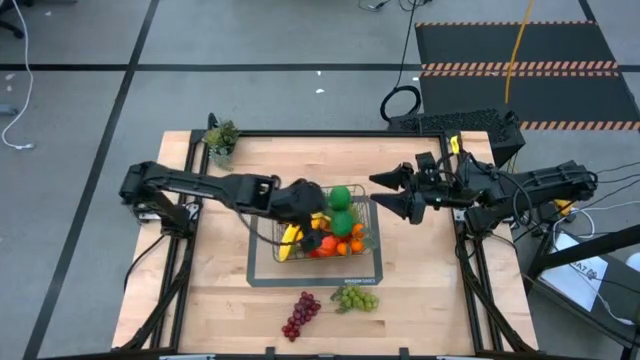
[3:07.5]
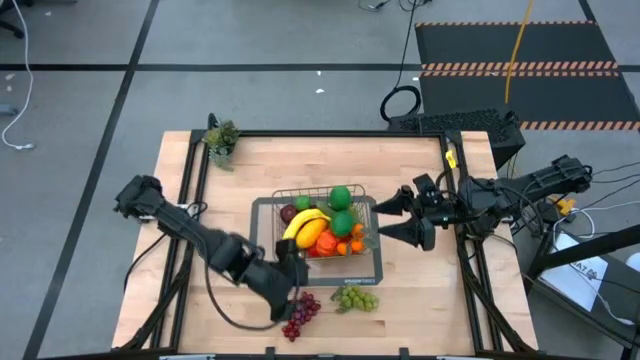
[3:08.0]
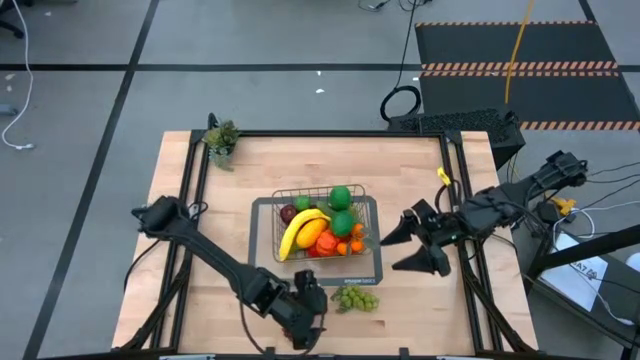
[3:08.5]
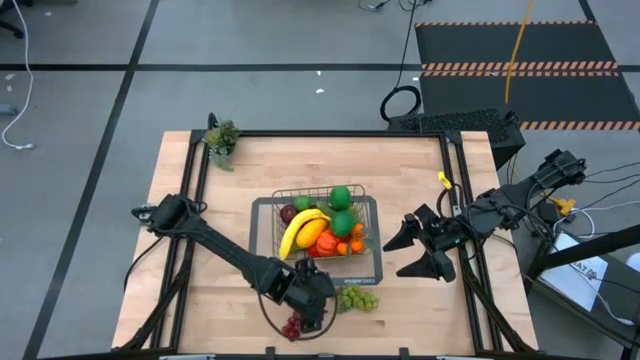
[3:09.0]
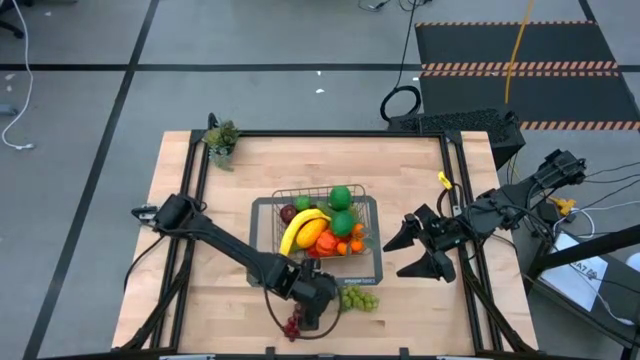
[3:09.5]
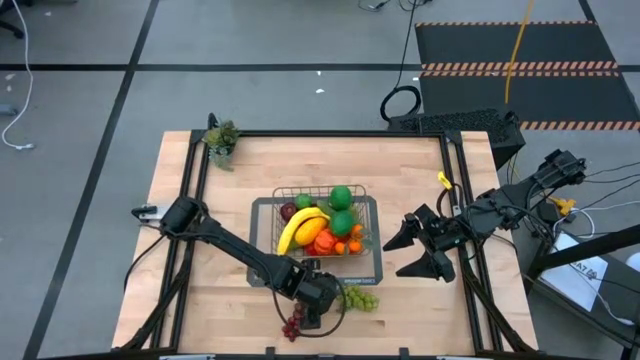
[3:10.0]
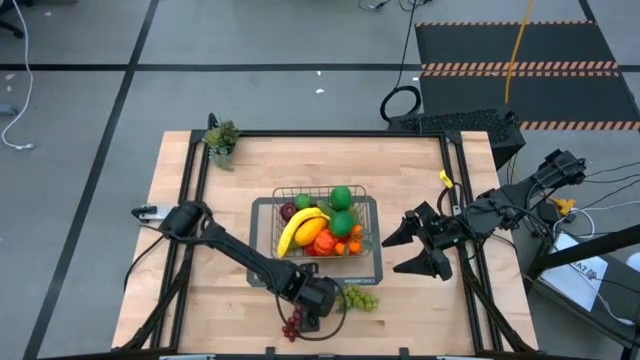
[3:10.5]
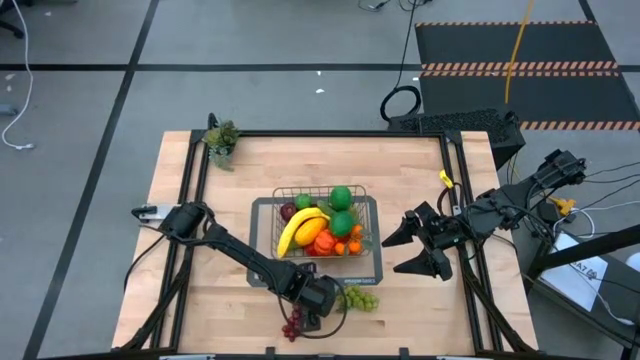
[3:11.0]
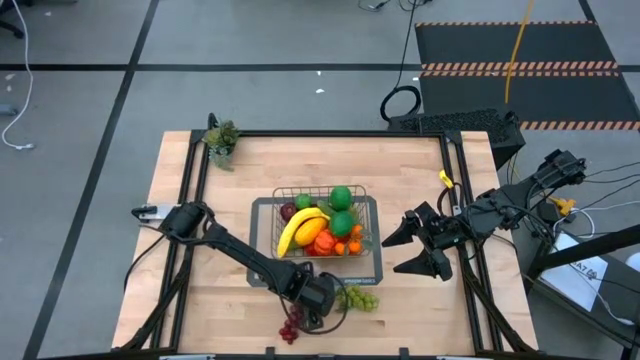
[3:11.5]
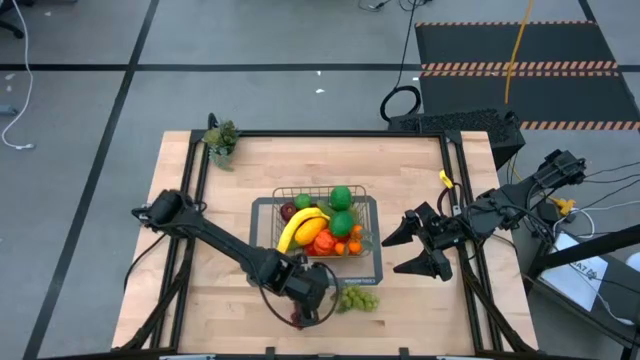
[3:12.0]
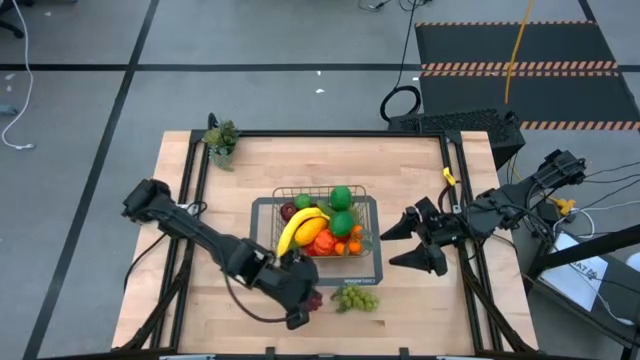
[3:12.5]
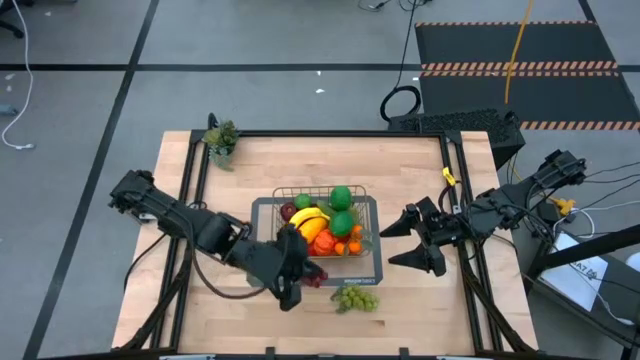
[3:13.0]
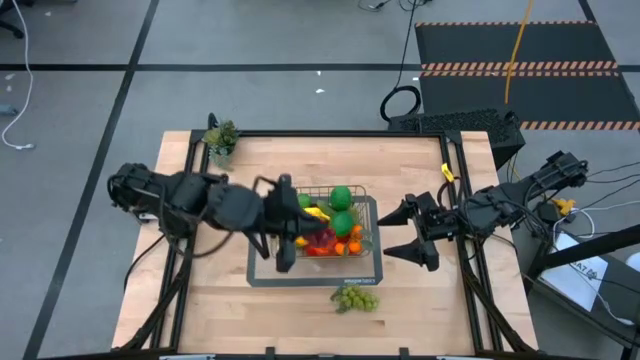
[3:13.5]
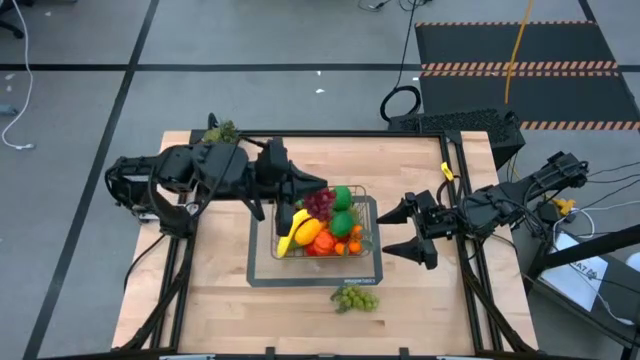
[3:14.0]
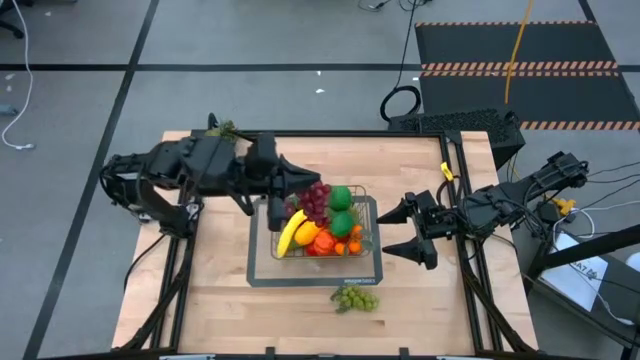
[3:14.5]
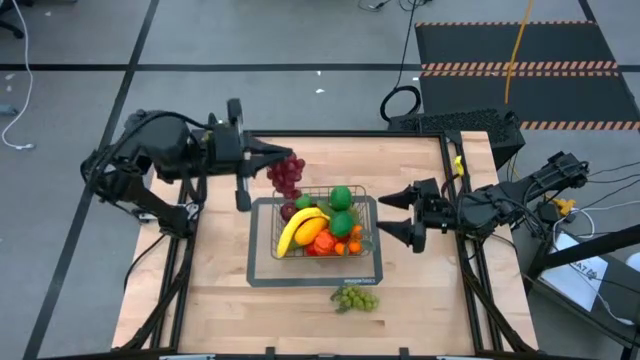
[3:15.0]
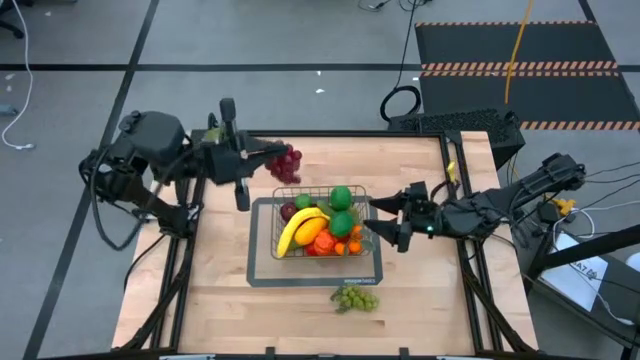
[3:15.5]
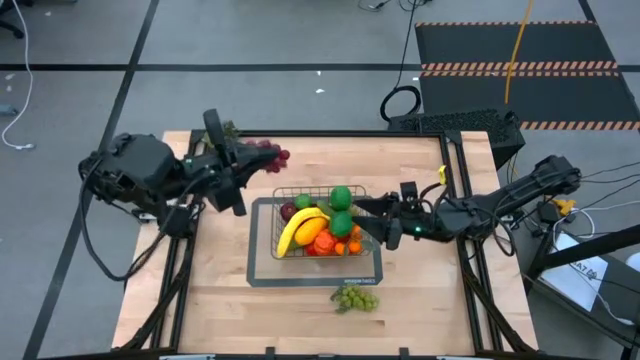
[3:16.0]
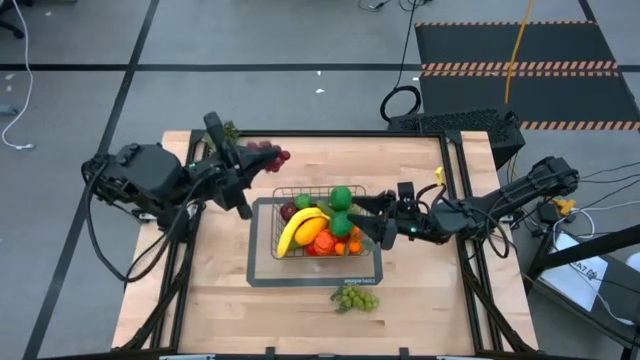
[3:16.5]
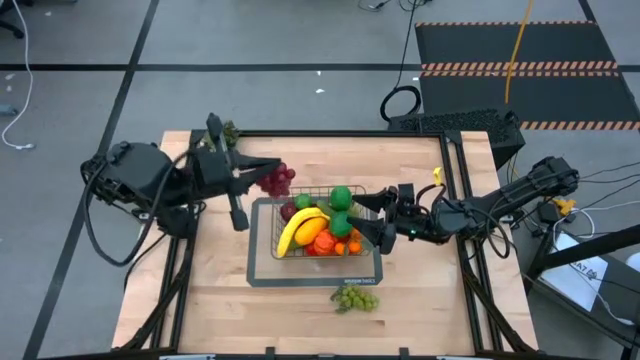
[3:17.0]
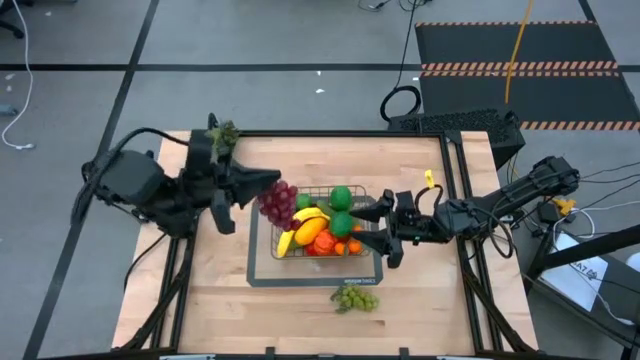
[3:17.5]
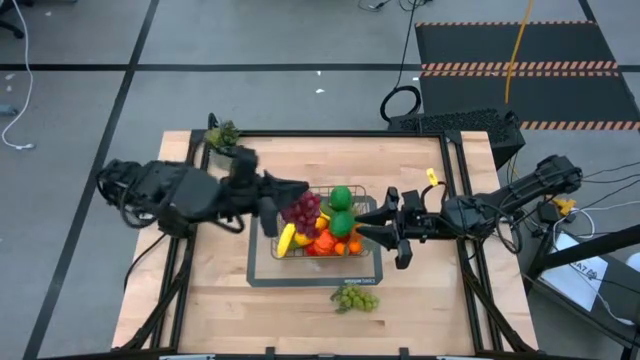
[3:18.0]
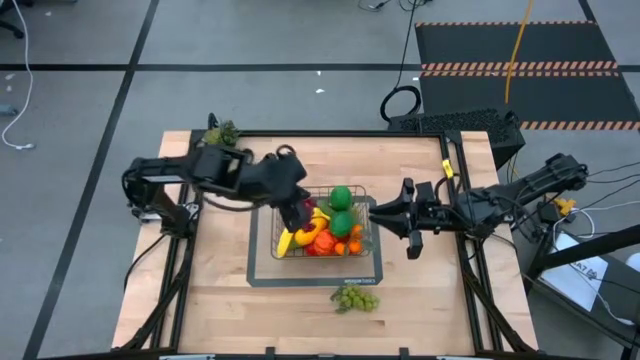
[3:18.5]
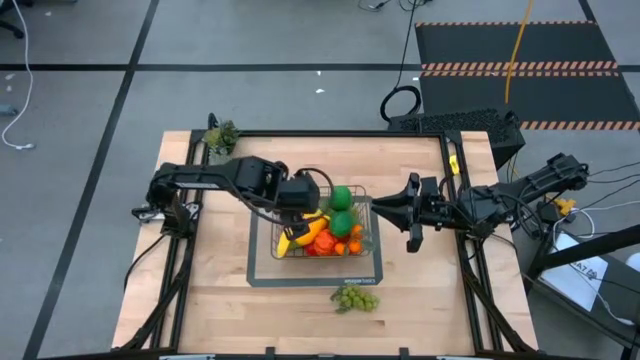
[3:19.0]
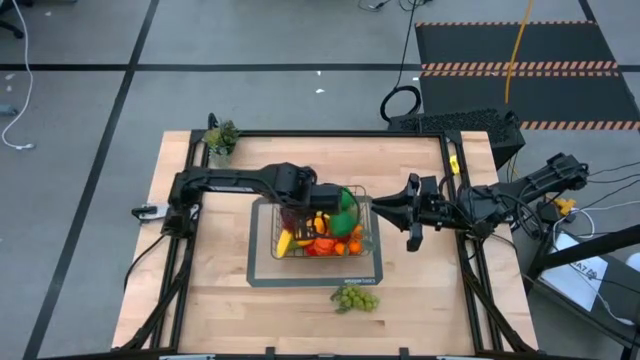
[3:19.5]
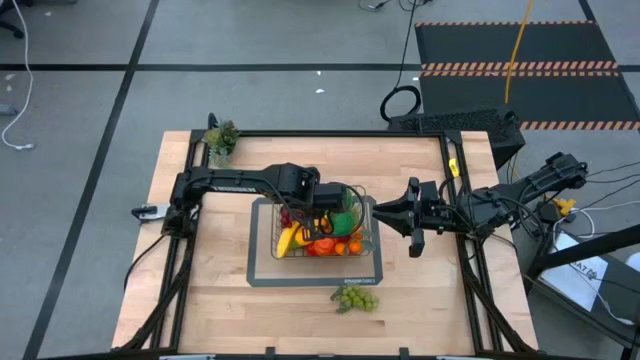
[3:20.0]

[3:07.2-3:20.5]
Task: Build produce basket
Put the violet grapes into the gold wire basket

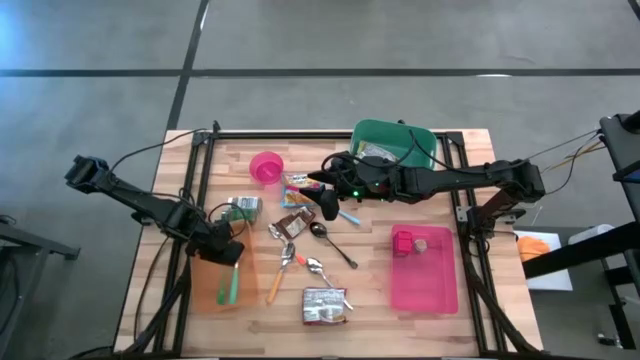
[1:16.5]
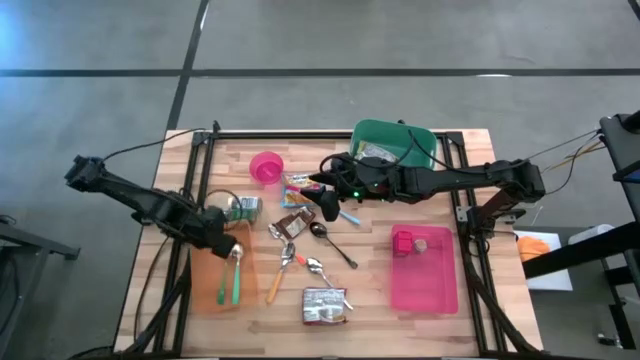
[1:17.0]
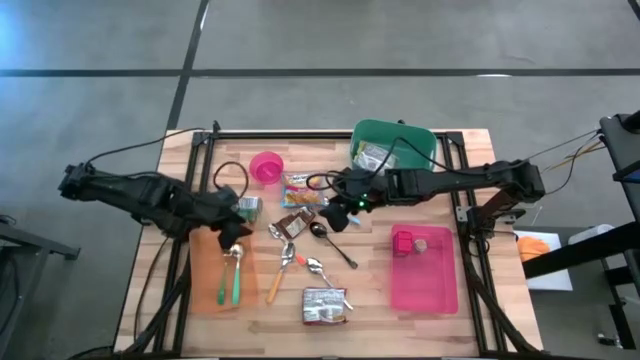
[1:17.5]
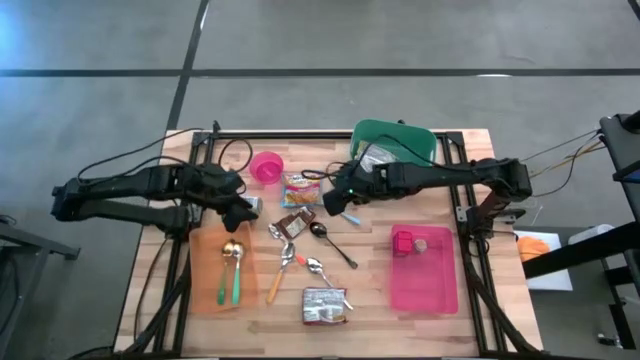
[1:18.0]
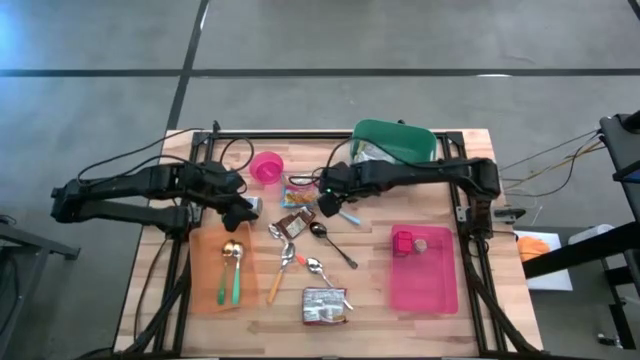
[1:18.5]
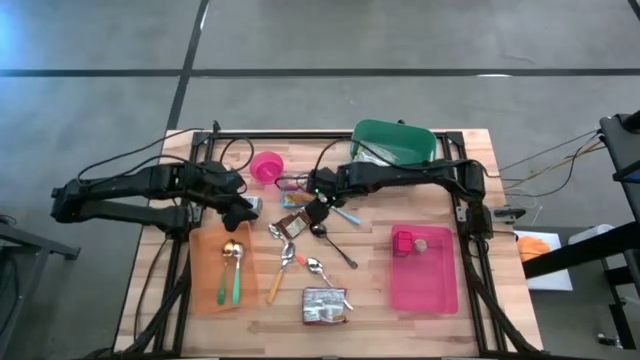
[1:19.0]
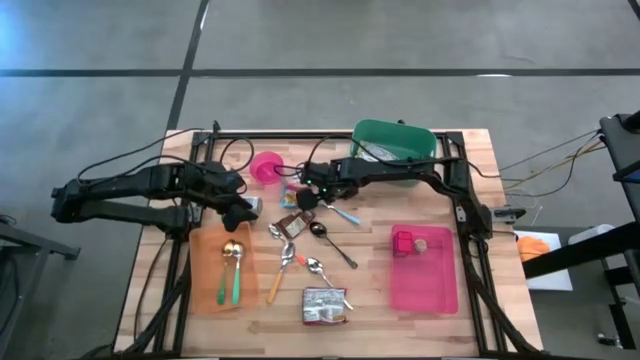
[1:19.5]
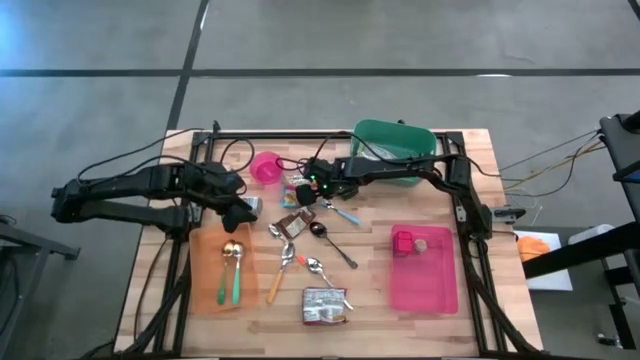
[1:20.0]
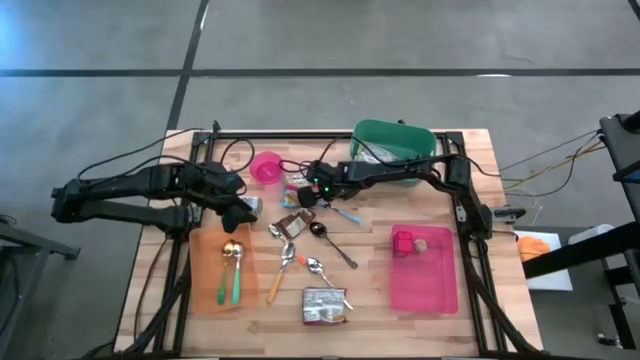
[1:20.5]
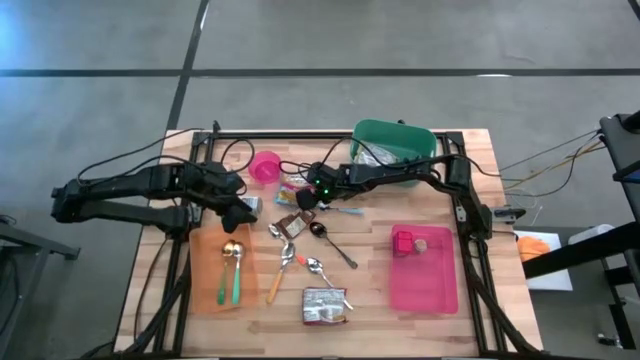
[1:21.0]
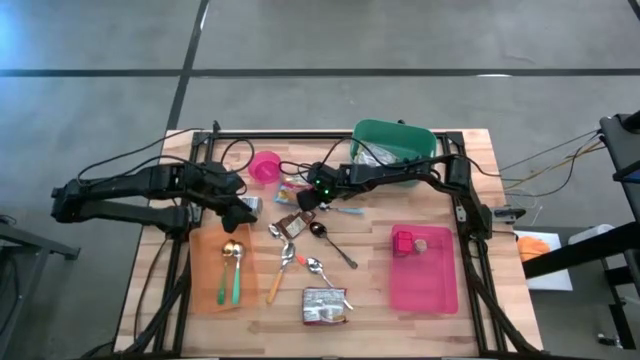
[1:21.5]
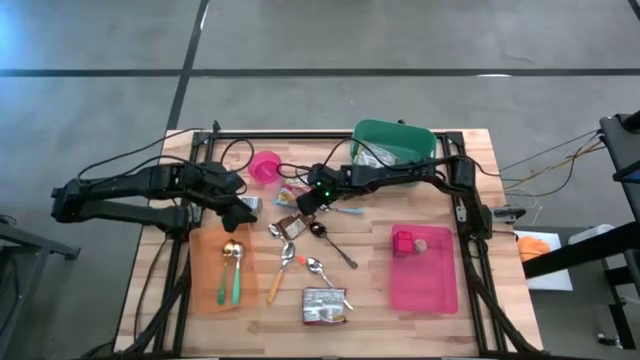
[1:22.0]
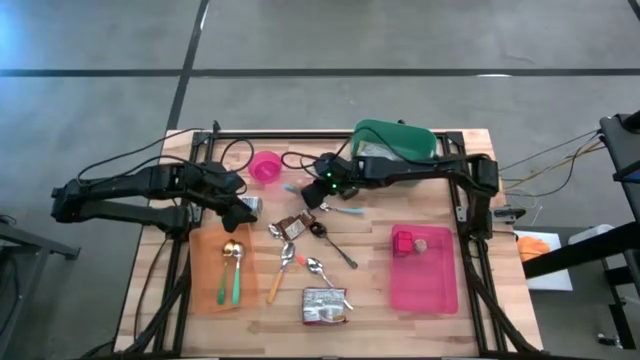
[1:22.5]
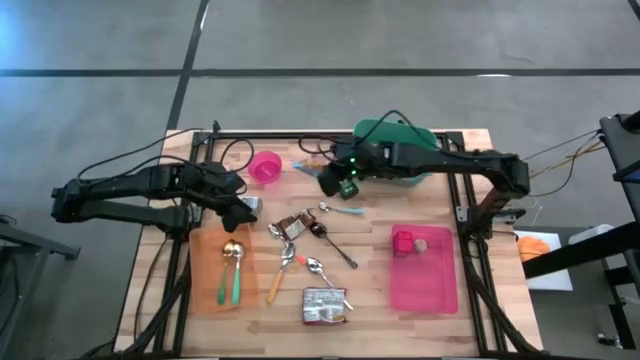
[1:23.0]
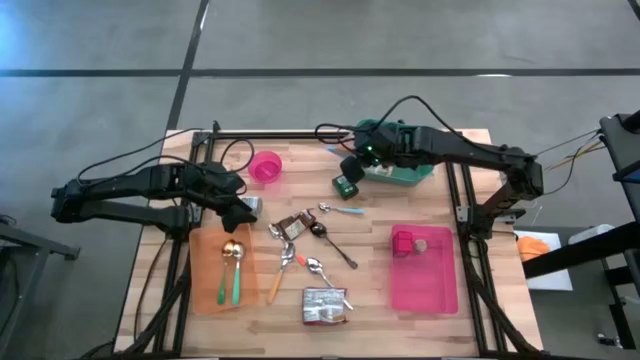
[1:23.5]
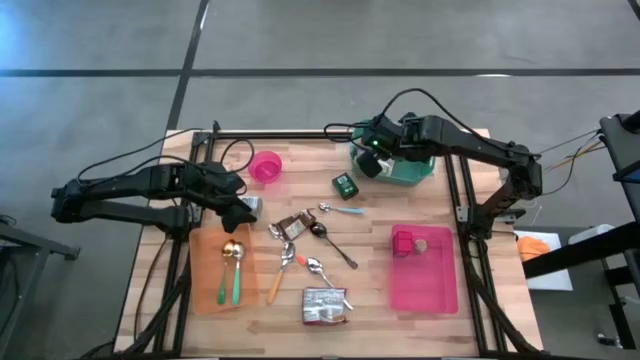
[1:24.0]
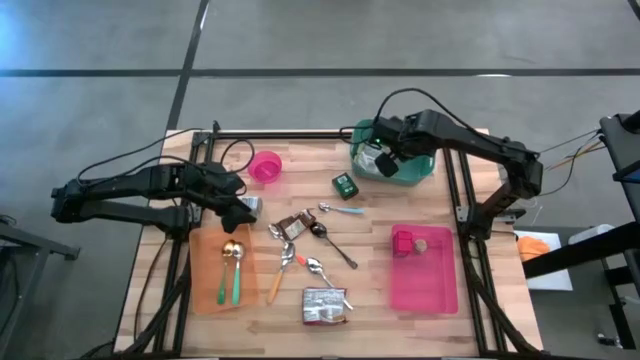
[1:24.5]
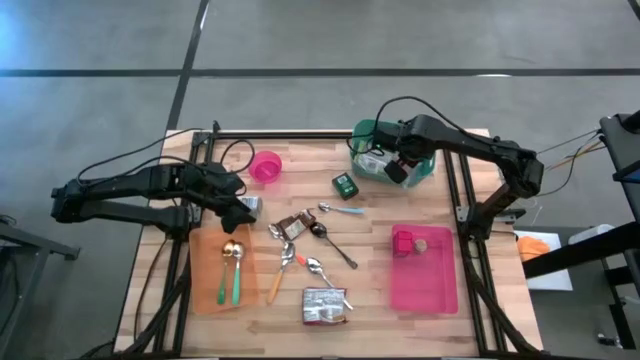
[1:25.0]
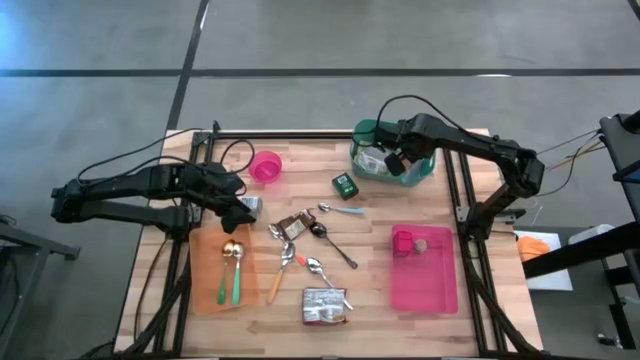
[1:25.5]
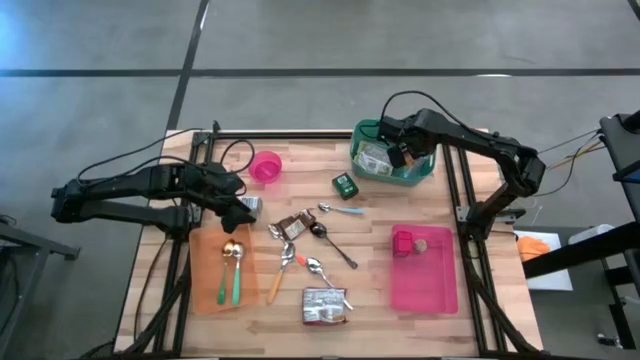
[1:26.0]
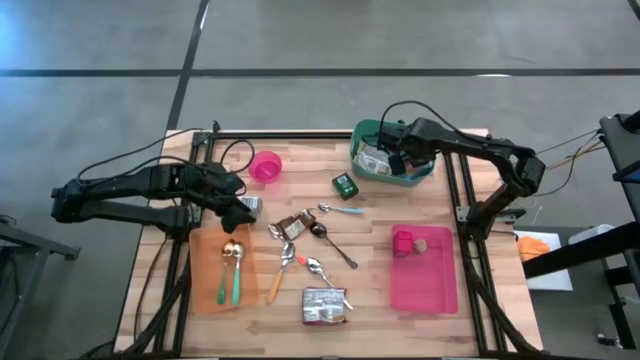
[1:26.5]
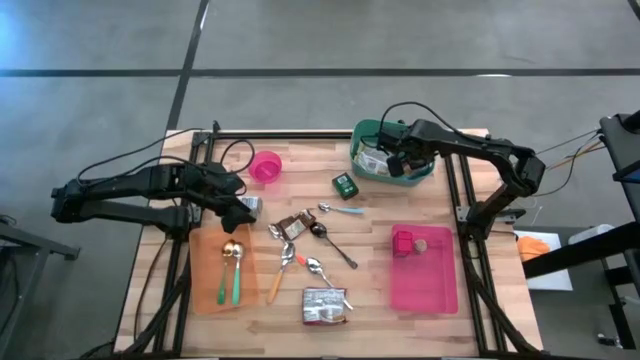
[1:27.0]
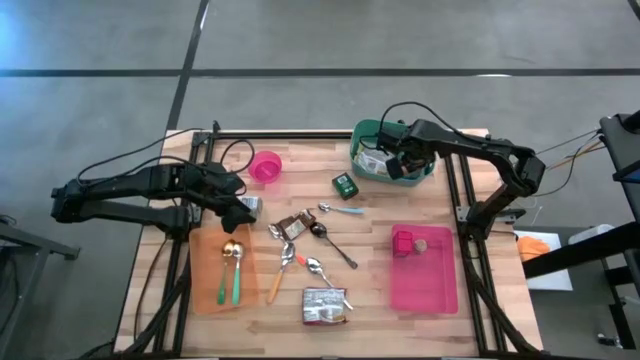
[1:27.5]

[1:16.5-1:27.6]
Task: Pick & Place Food Item
Put the blue noodle pack into the green bin
